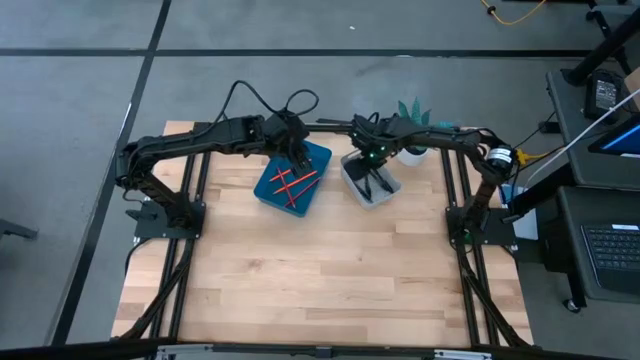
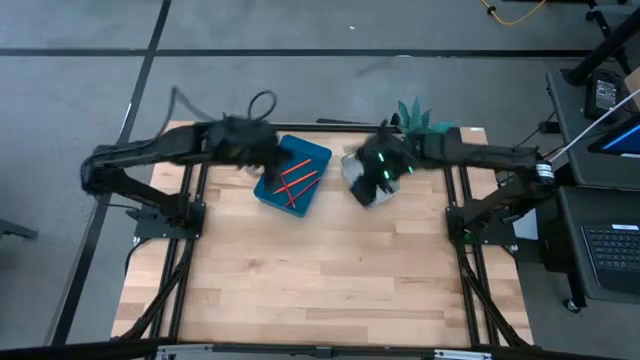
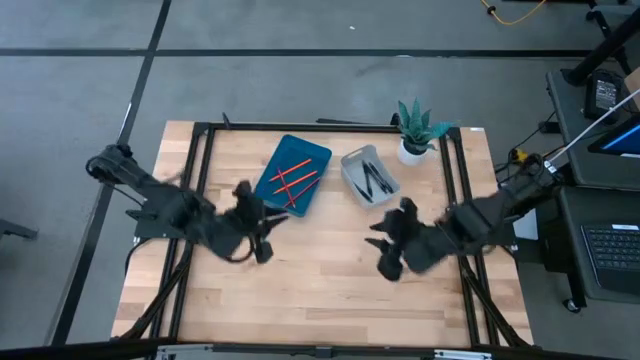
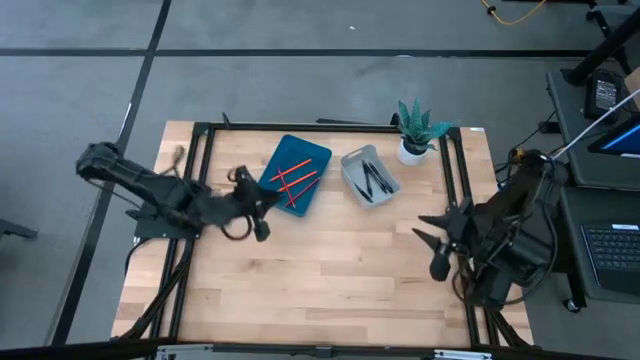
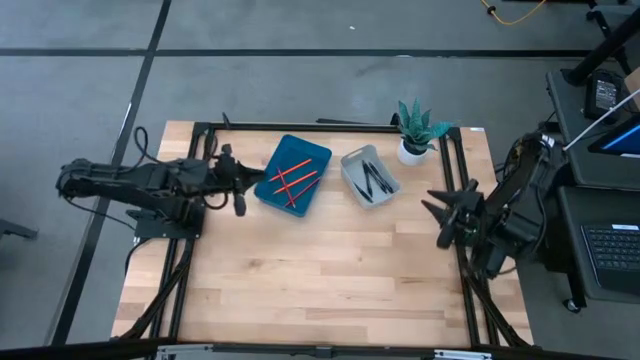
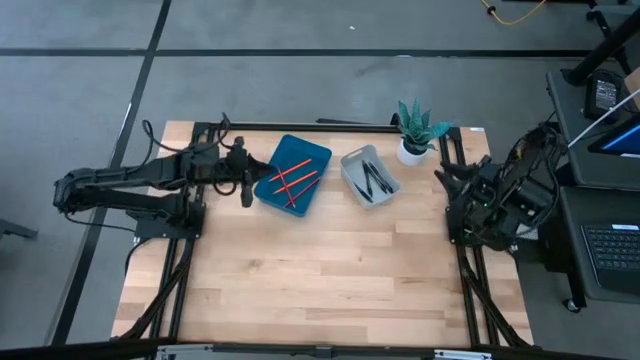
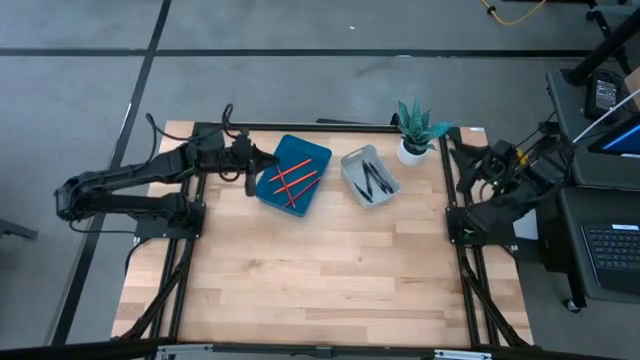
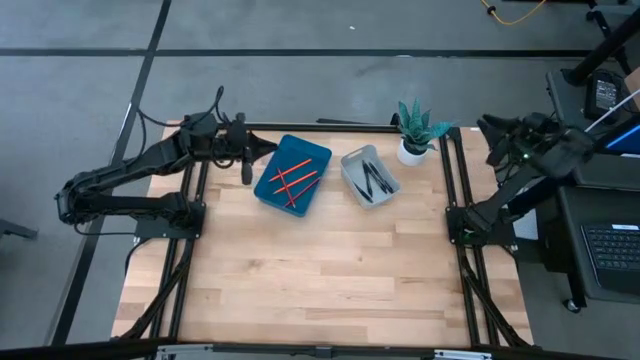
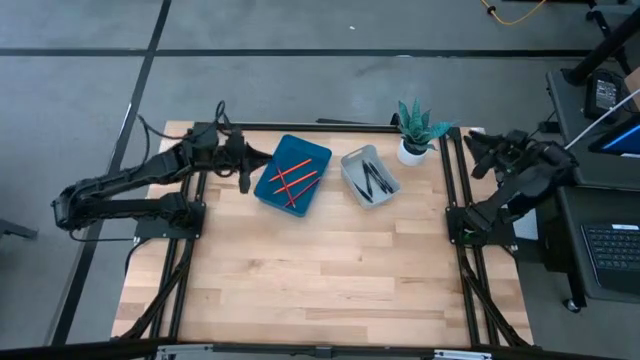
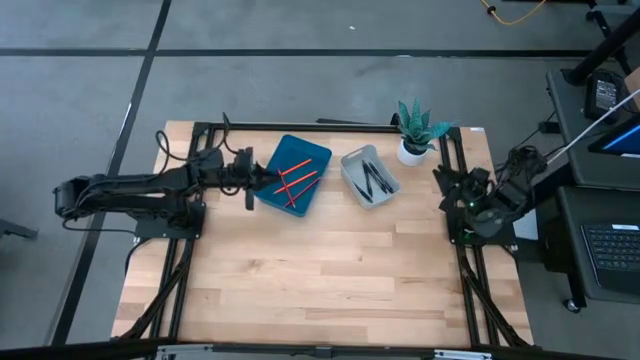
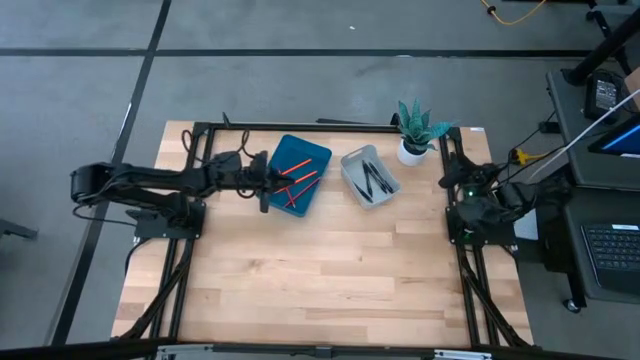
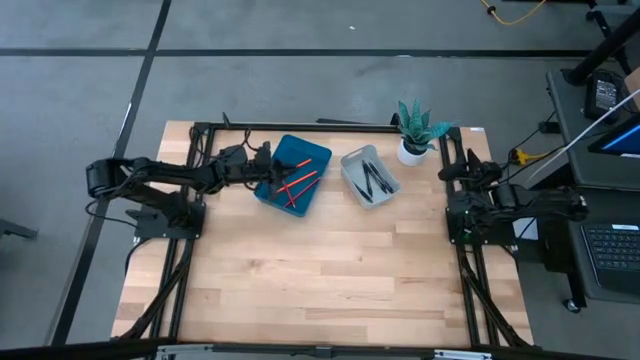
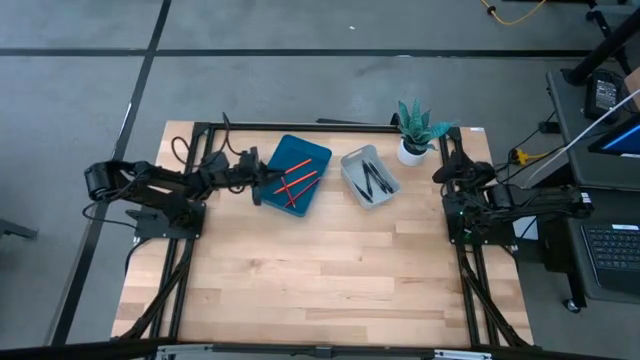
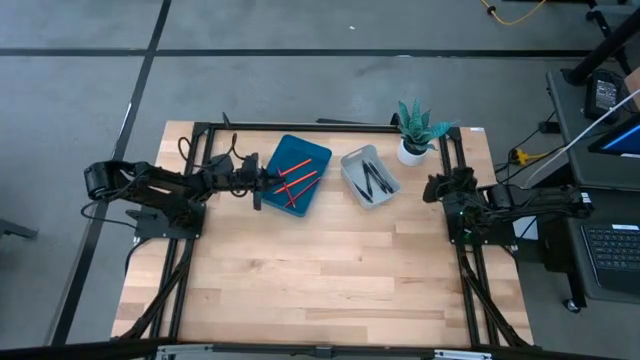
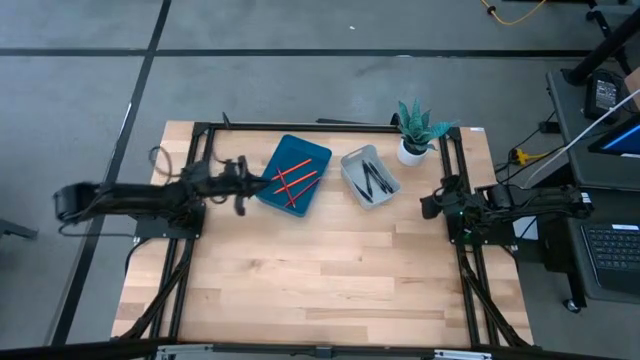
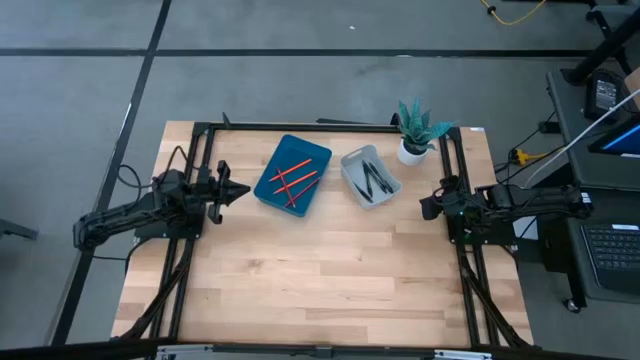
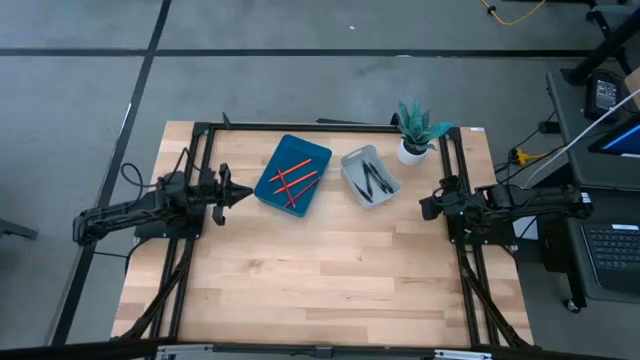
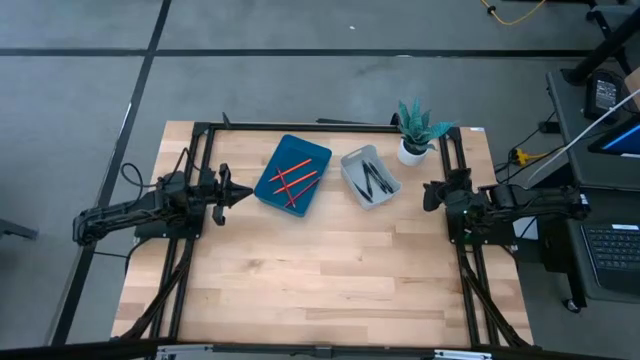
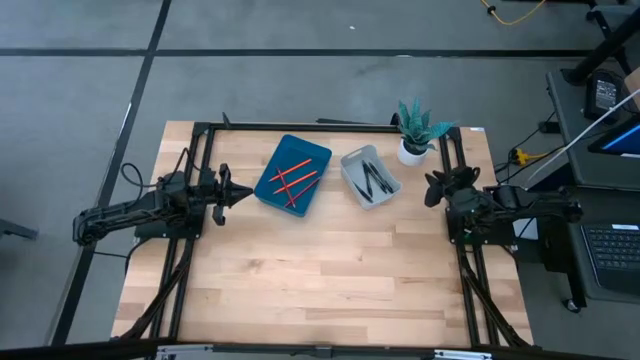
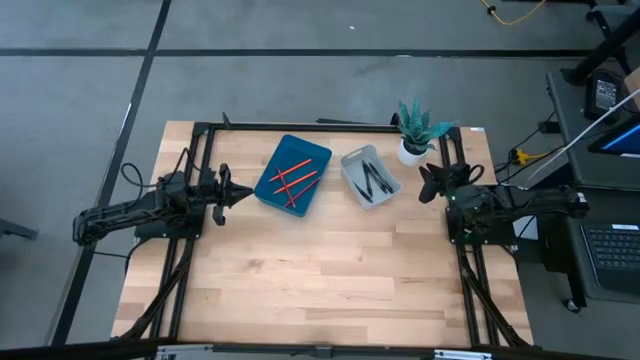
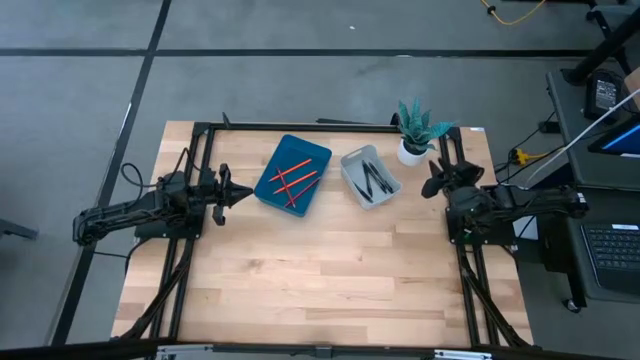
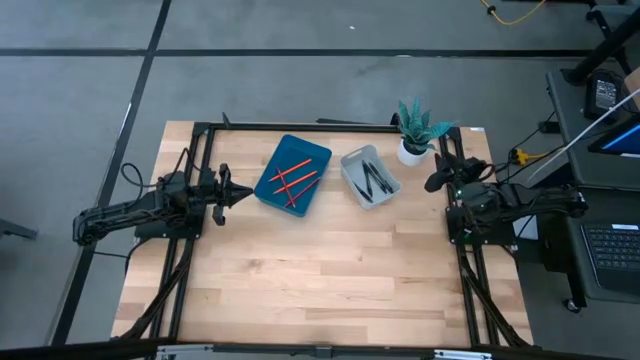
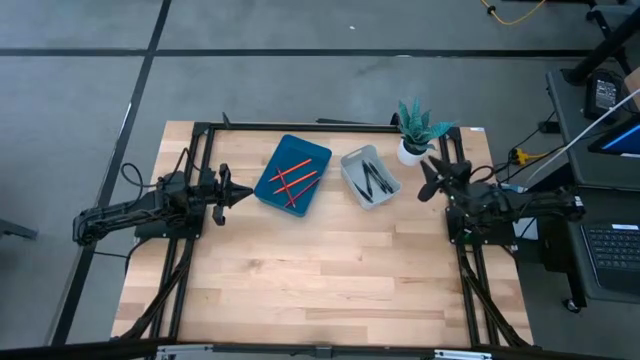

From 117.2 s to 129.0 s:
Task: Sort pens & pencils
Return to Home Position

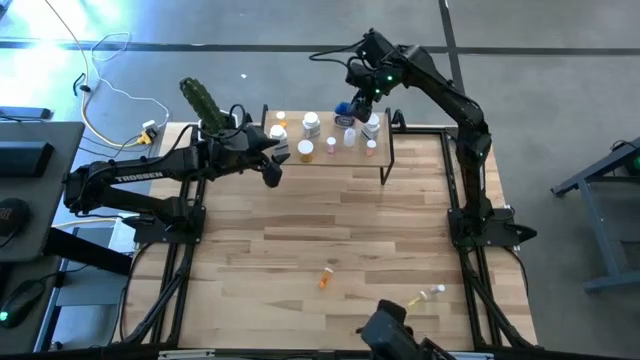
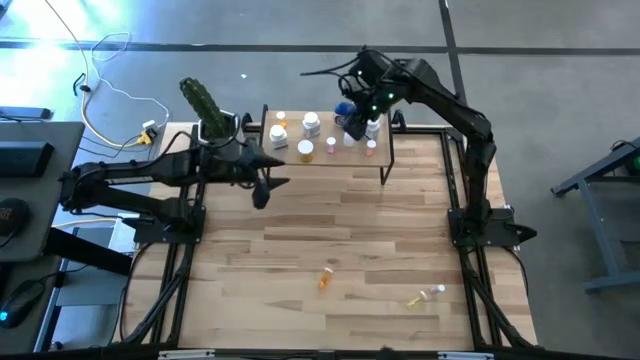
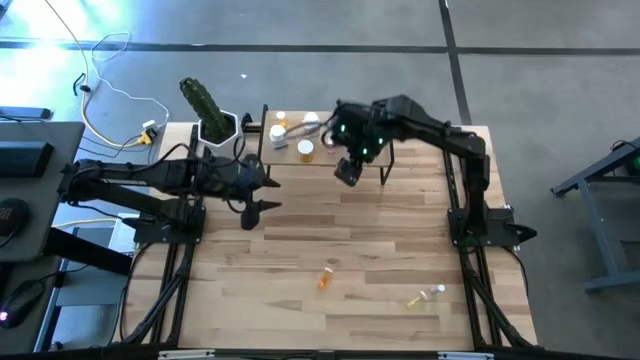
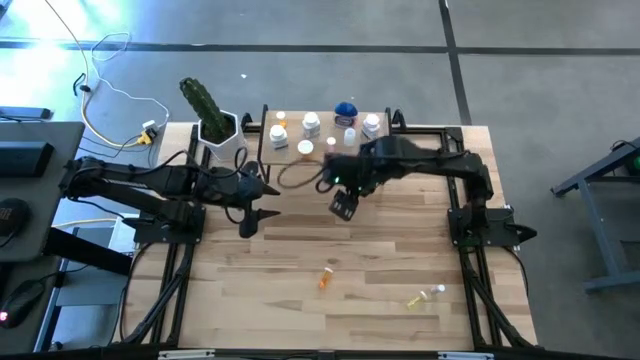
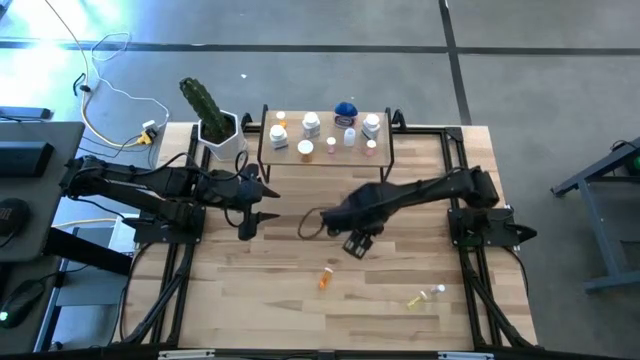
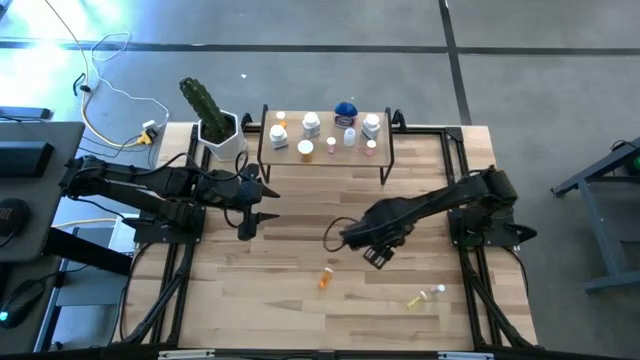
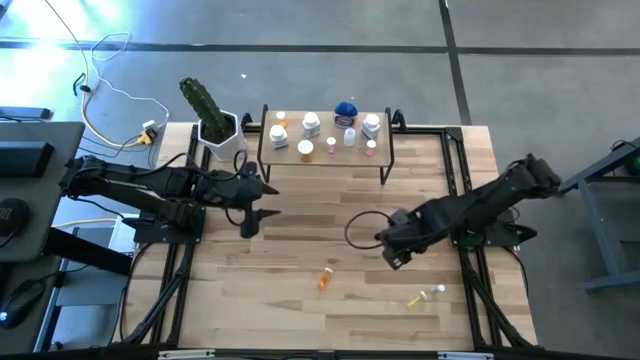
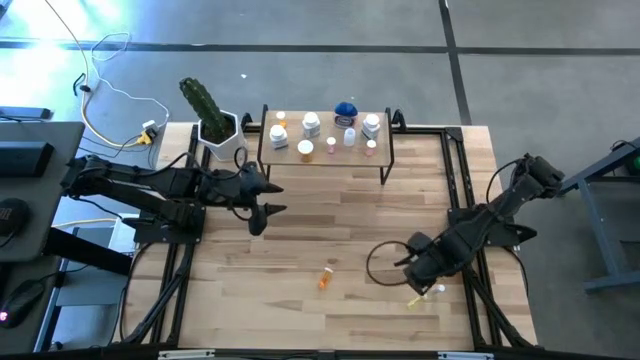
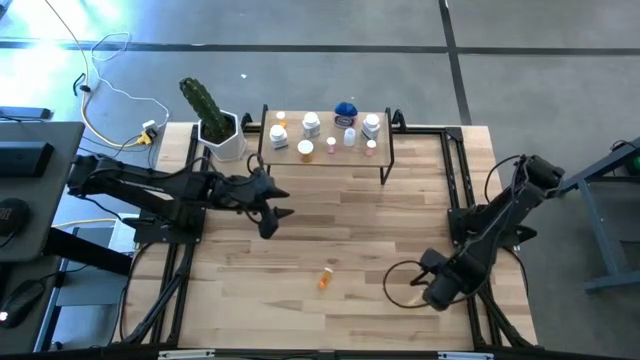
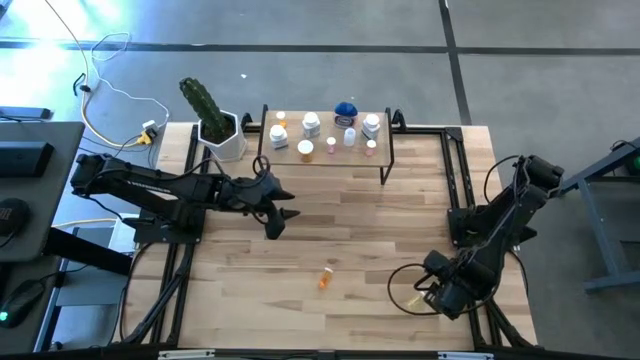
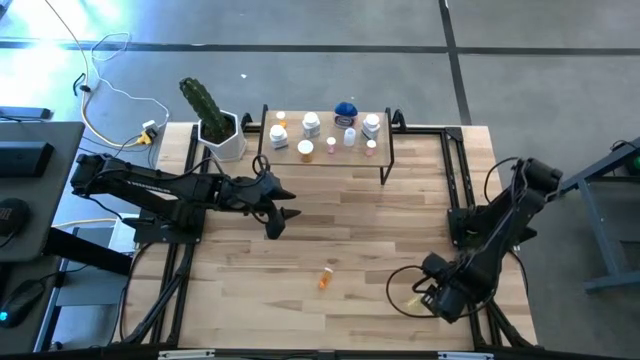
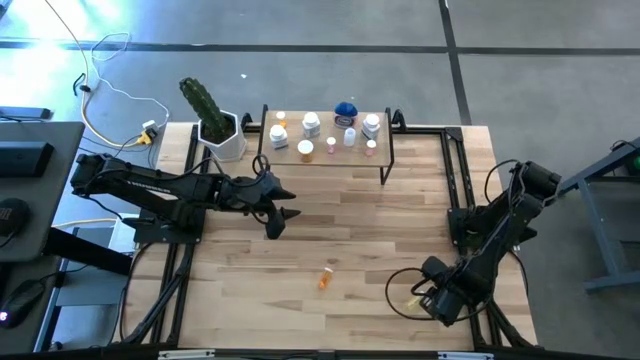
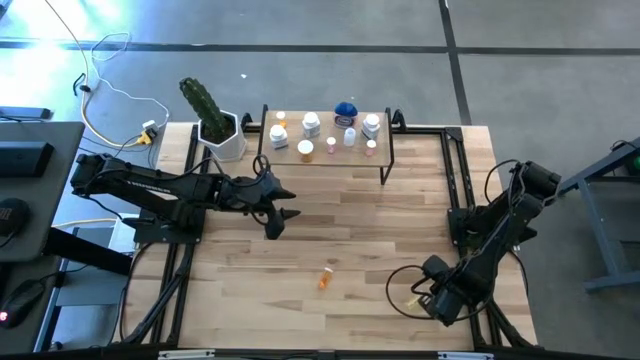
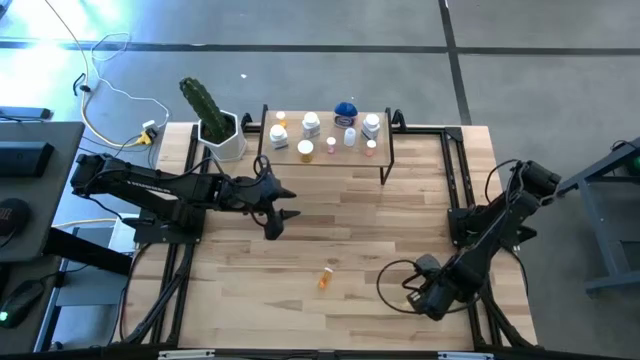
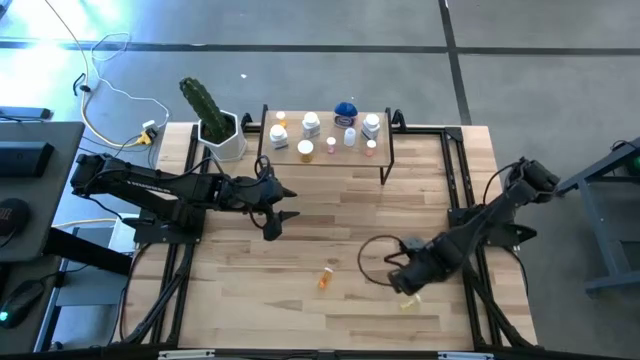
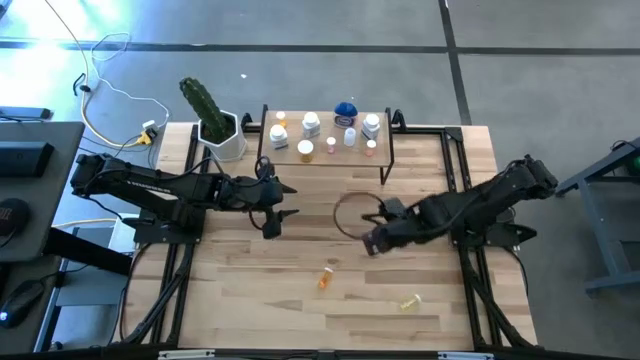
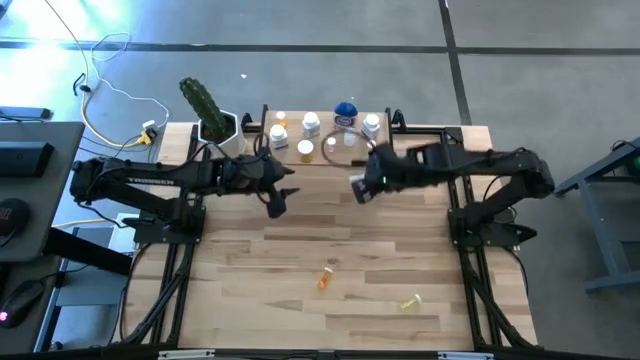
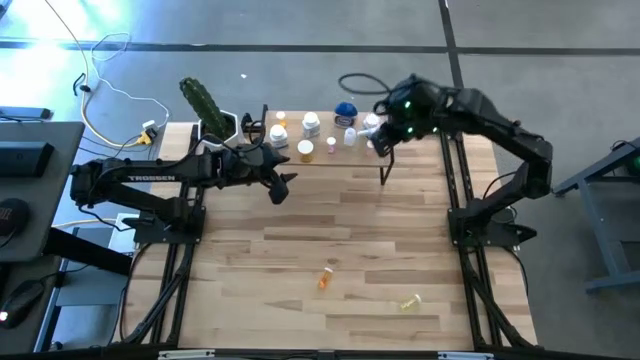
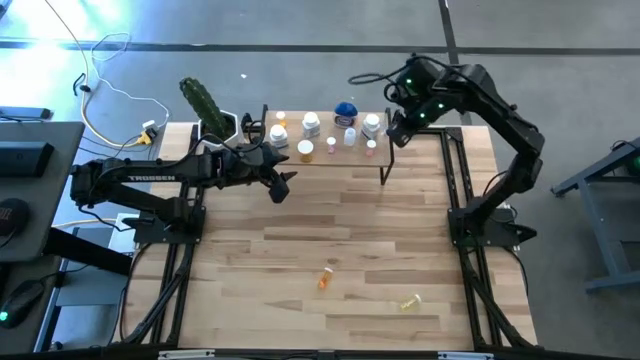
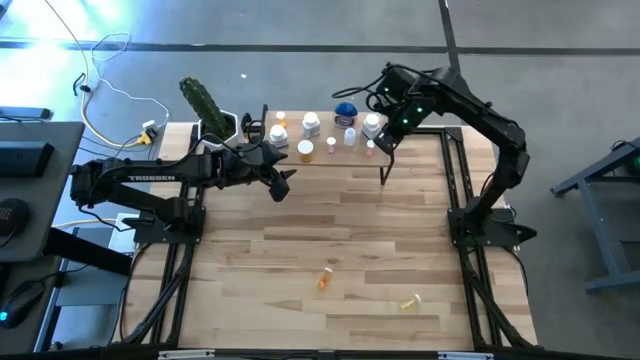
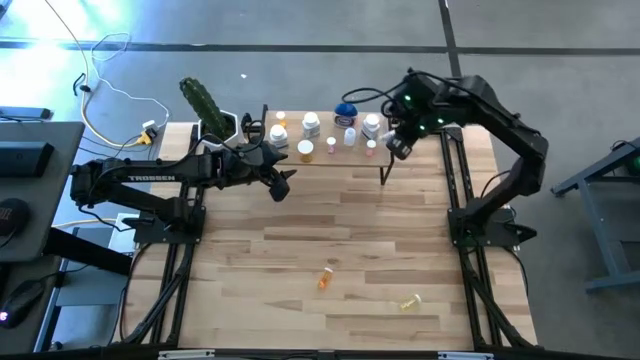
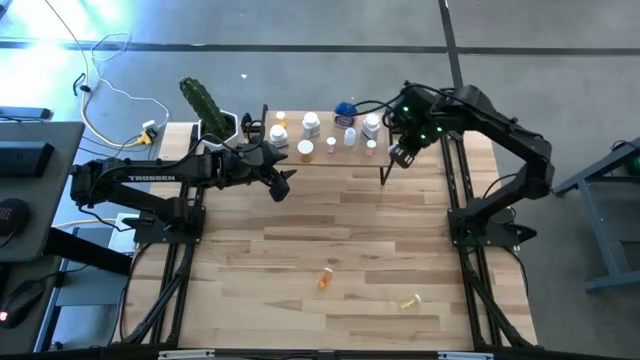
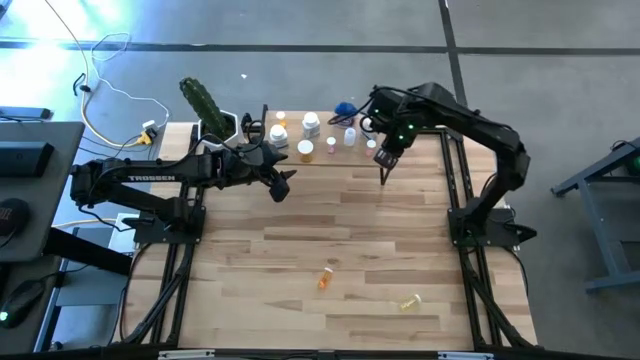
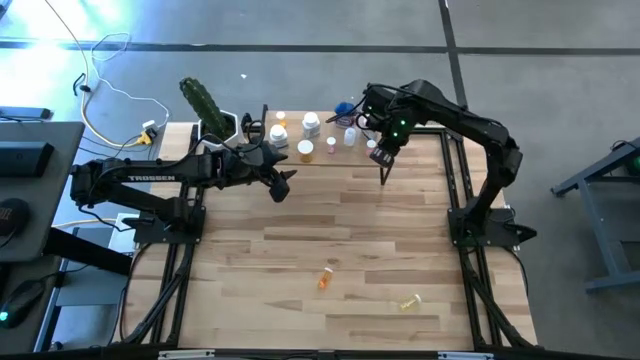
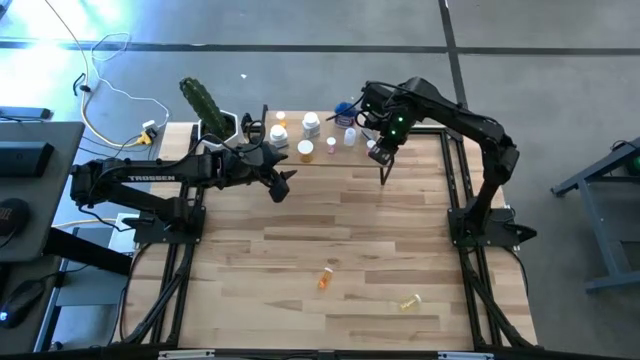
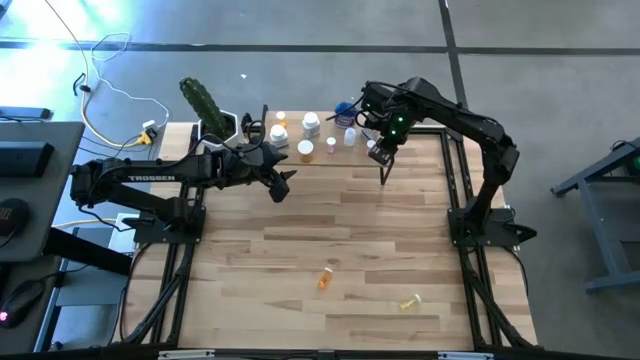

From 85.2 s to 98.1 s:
Task: Pick and place medicine bottles onto shelf by color
Put the white pill bottle on the shelf
